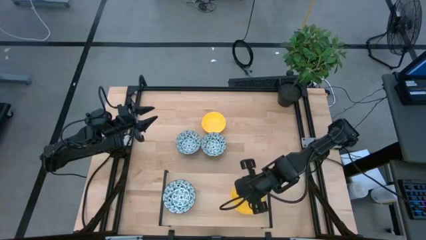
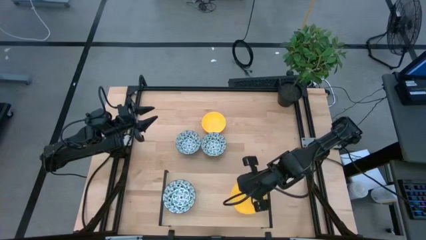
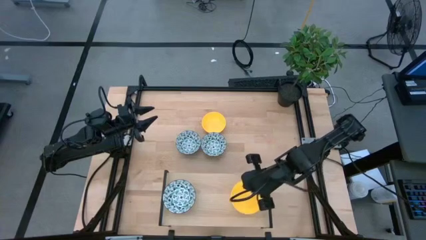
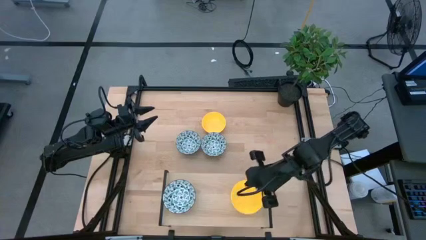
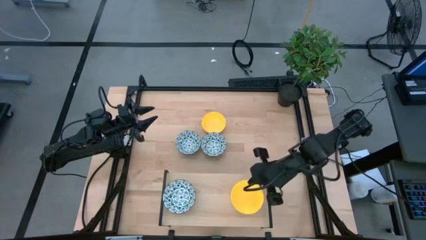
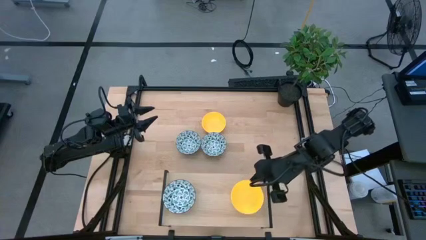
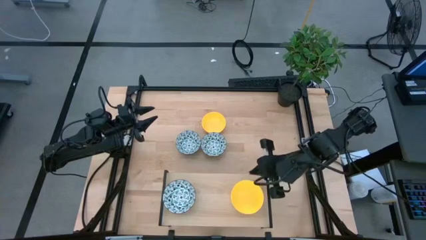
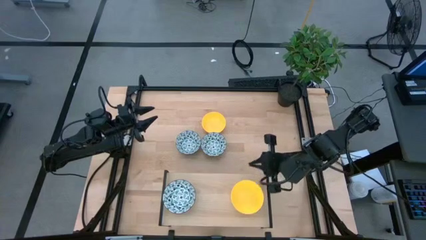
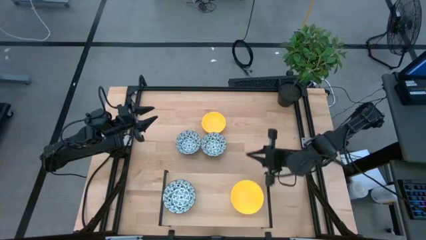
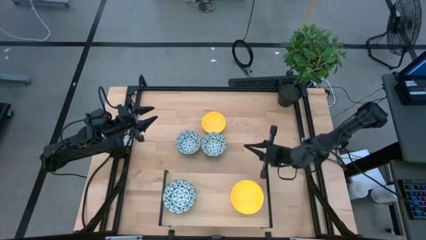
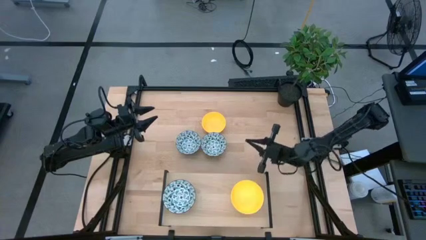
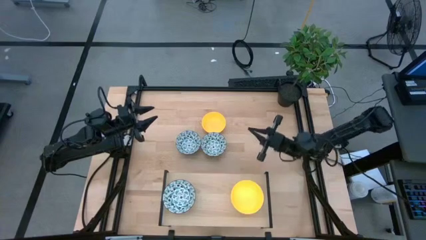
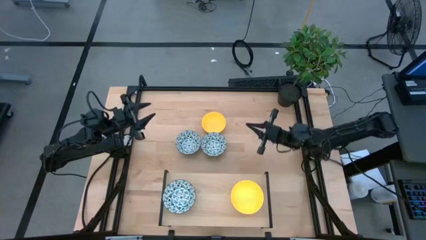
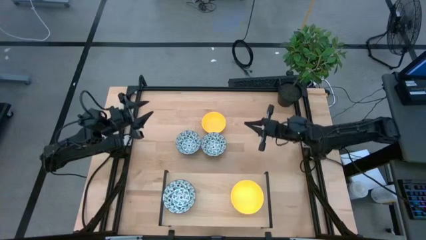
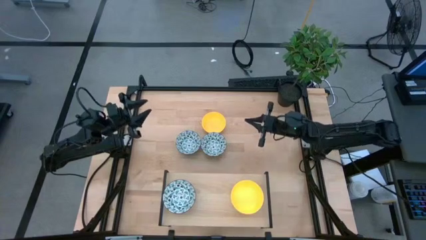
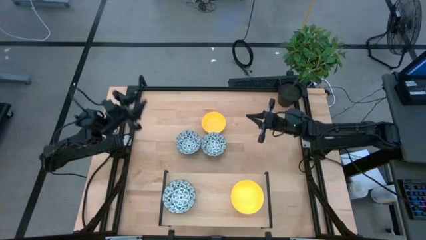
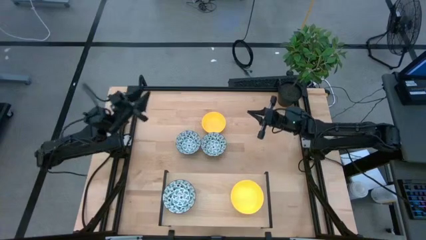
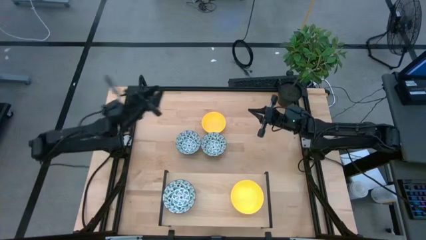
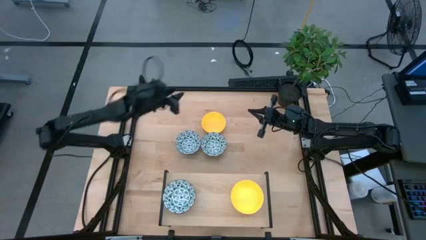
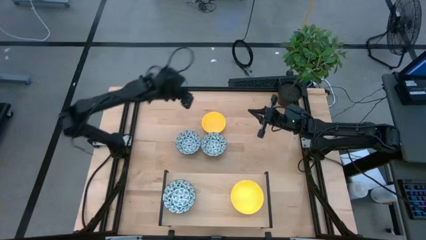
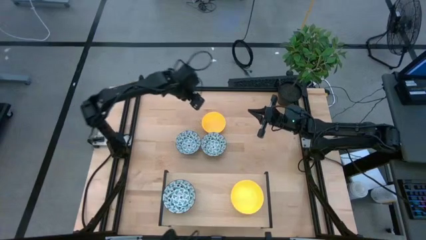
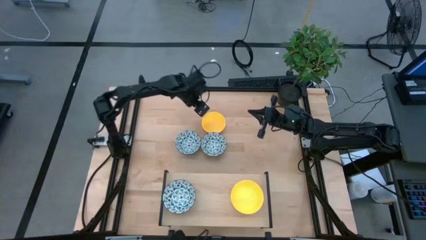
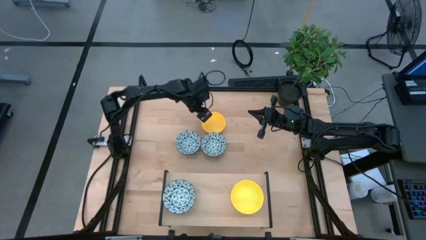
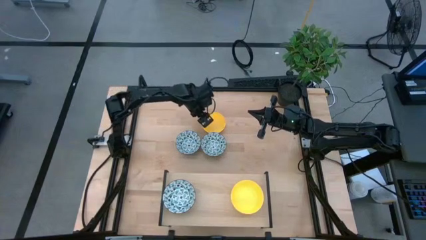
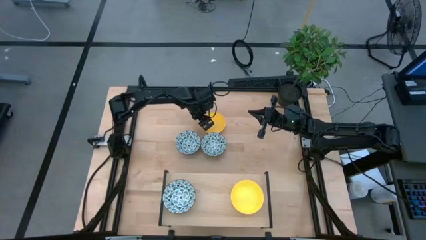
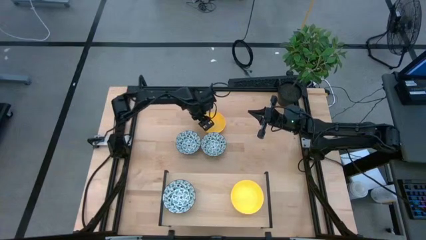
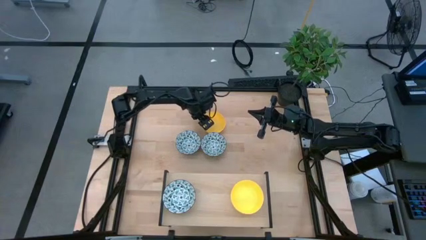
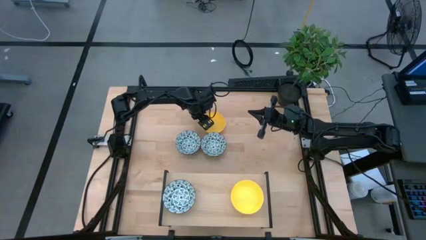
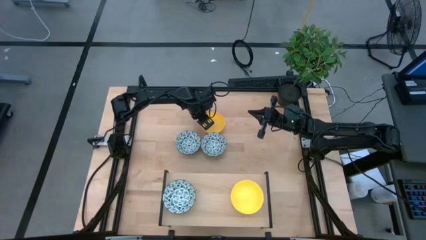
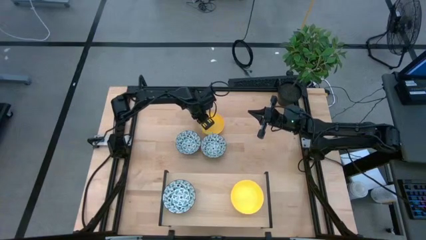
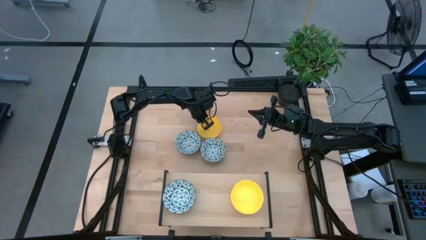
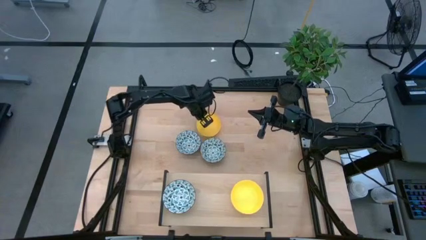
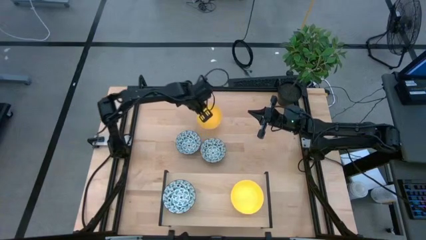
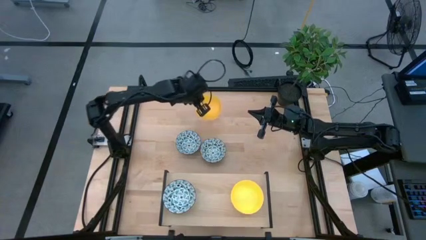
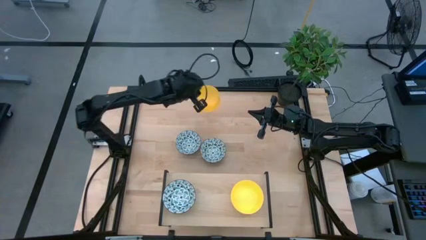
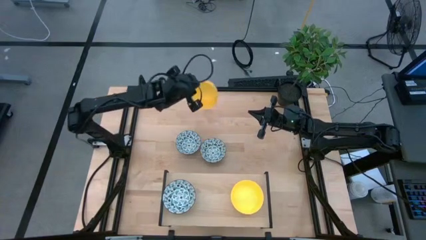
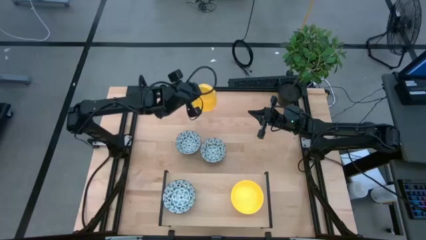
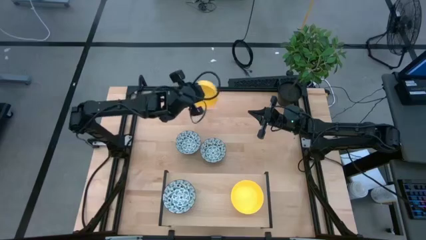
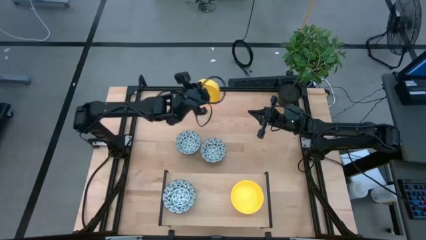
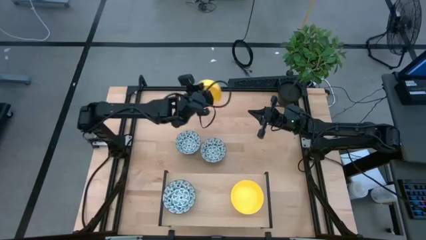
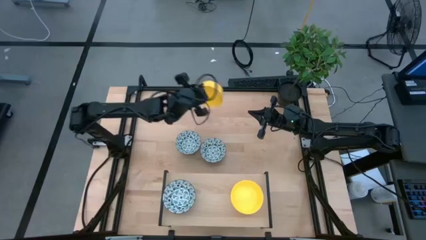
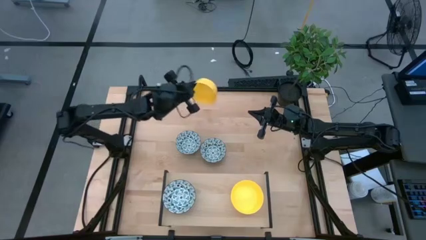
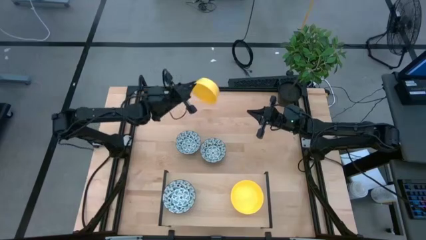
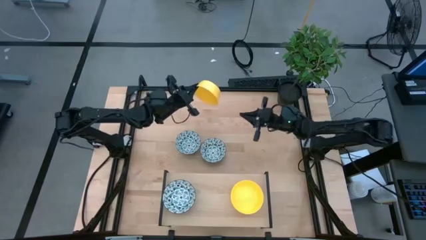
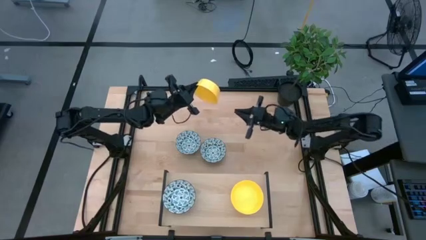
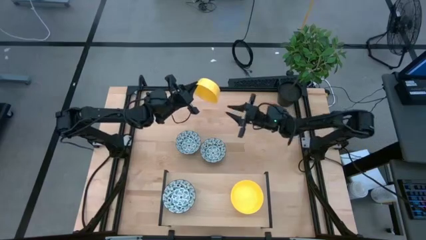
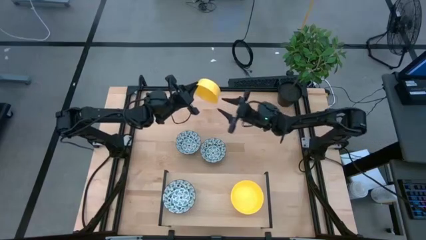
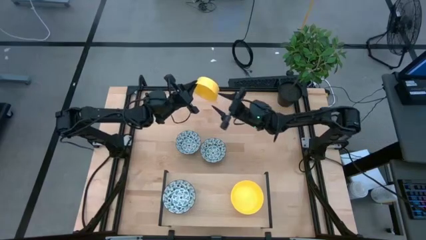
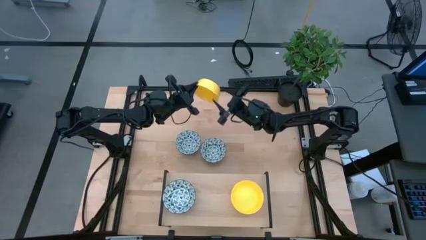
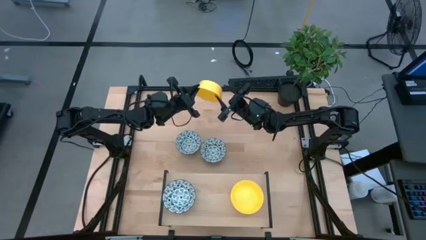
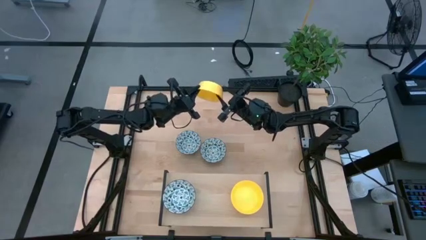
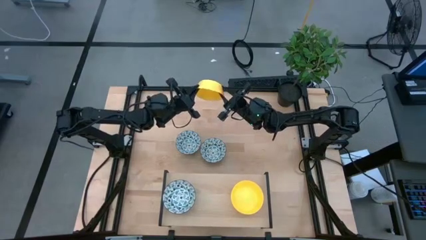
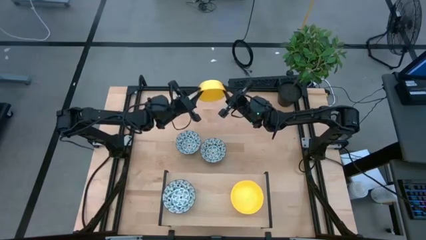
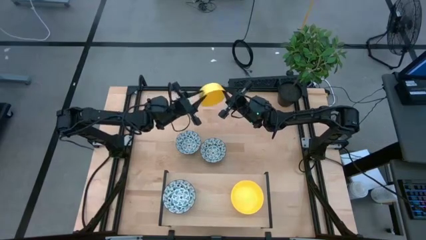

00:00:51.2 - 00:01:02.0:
Task: Pick & Place Mini bowls
Stack the yellow bowl on the yellow bowl on the shelf
